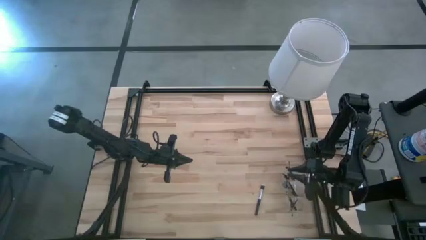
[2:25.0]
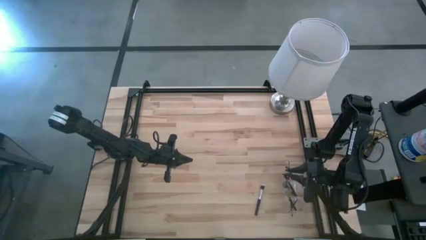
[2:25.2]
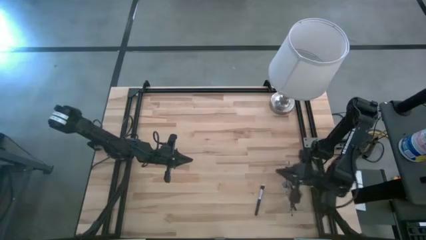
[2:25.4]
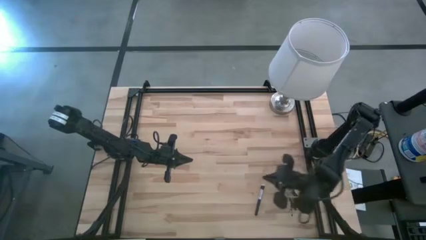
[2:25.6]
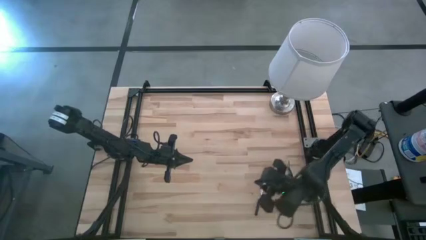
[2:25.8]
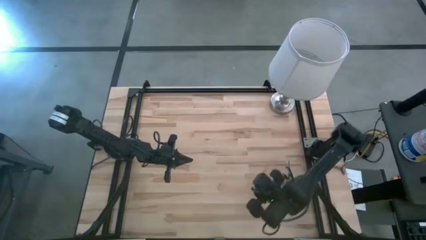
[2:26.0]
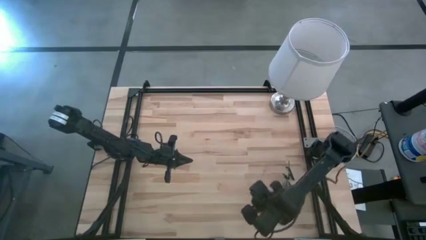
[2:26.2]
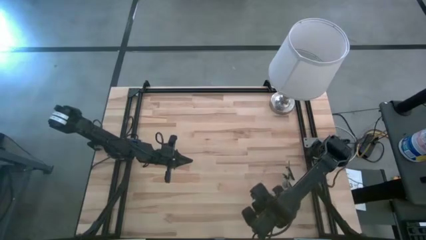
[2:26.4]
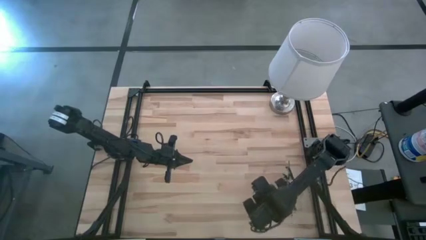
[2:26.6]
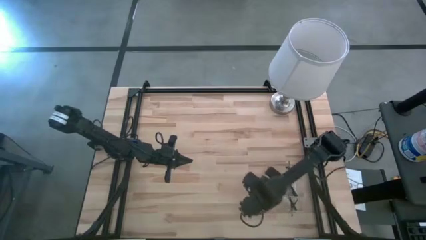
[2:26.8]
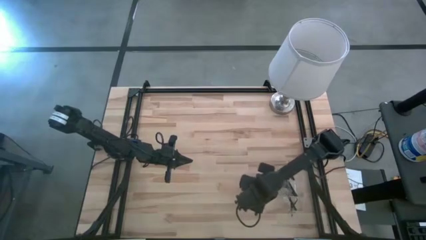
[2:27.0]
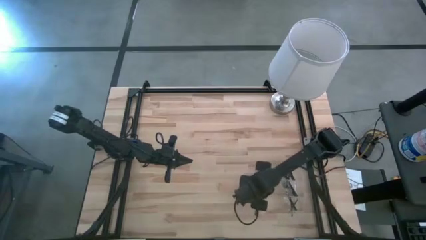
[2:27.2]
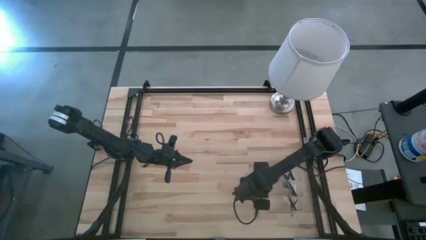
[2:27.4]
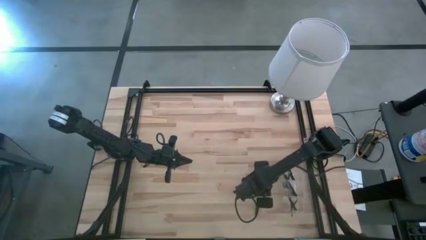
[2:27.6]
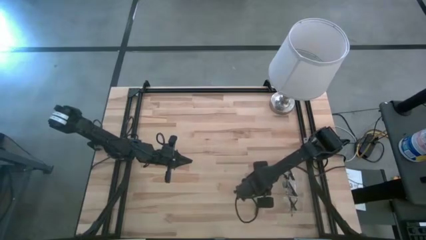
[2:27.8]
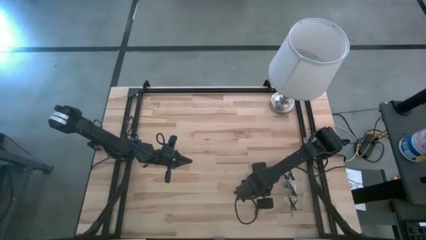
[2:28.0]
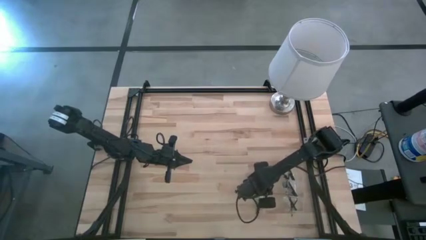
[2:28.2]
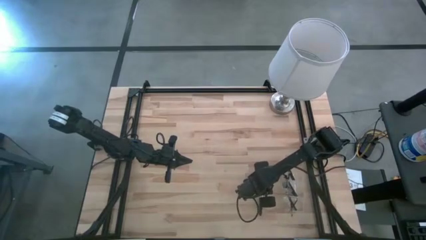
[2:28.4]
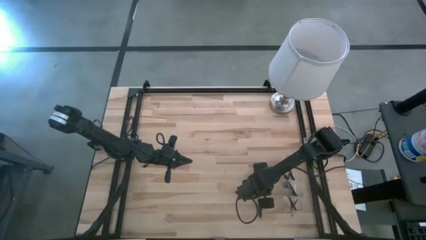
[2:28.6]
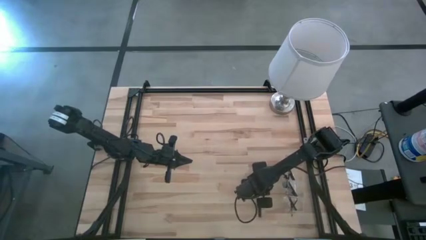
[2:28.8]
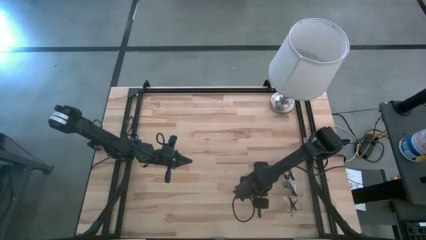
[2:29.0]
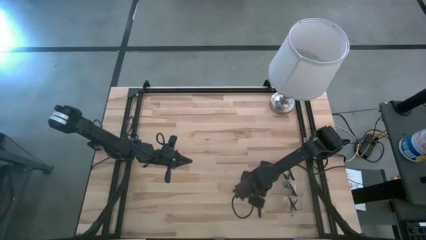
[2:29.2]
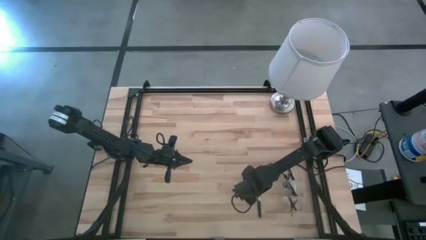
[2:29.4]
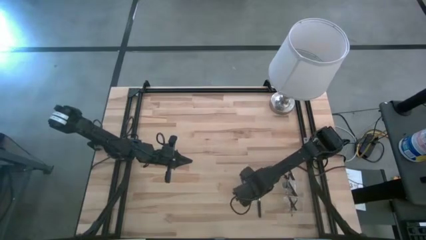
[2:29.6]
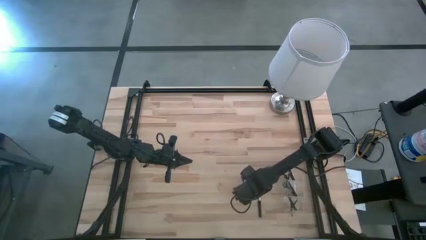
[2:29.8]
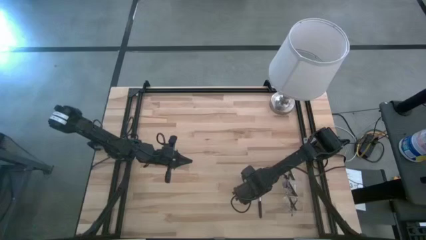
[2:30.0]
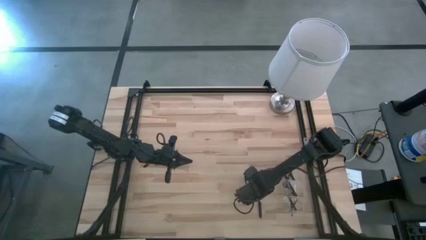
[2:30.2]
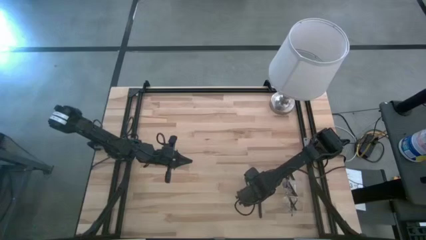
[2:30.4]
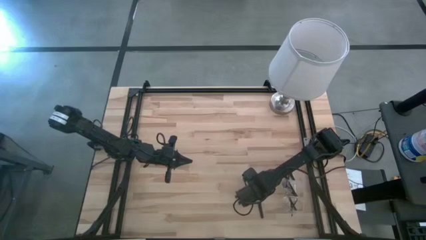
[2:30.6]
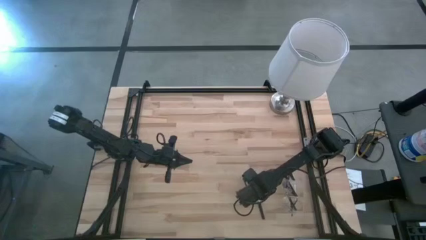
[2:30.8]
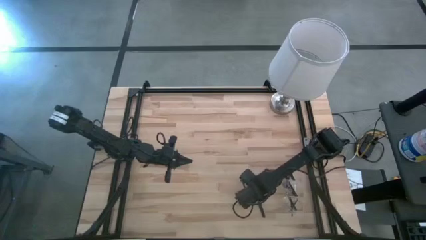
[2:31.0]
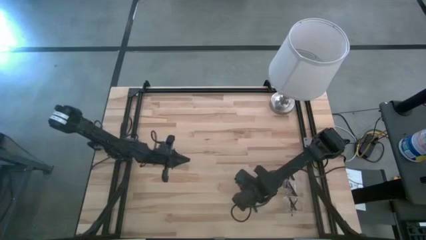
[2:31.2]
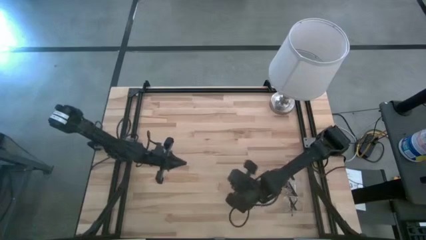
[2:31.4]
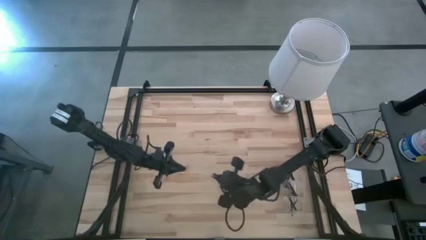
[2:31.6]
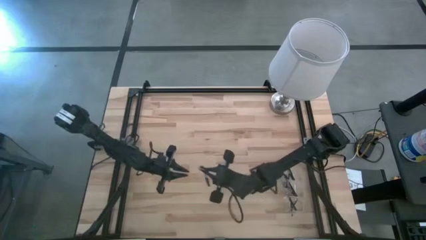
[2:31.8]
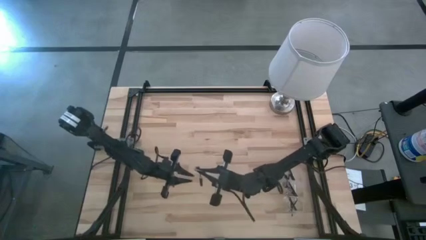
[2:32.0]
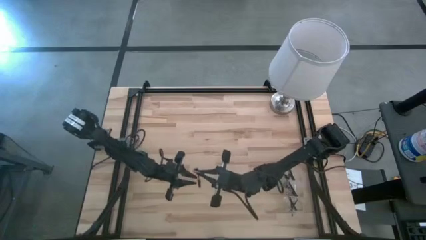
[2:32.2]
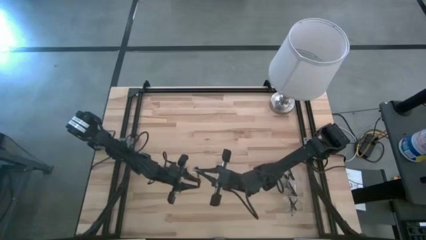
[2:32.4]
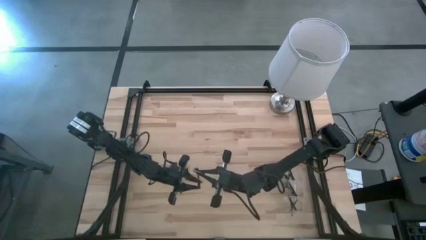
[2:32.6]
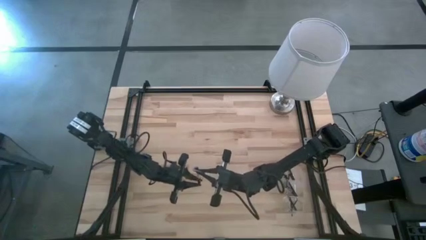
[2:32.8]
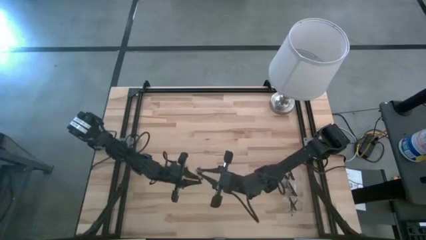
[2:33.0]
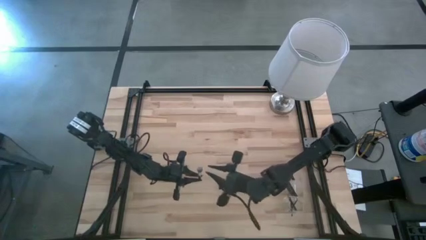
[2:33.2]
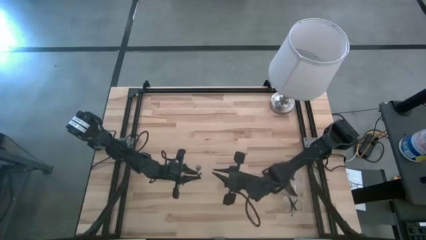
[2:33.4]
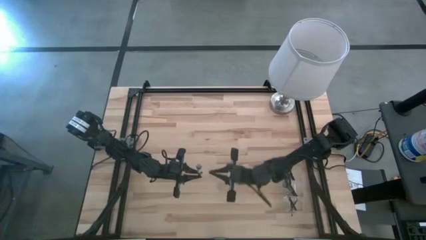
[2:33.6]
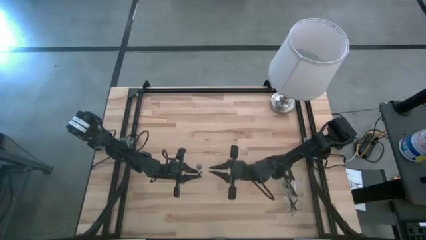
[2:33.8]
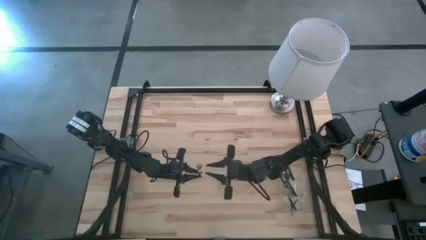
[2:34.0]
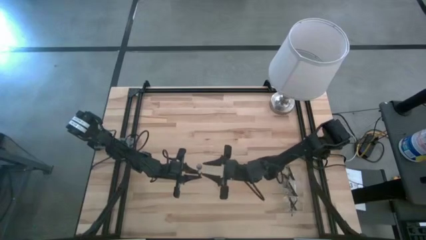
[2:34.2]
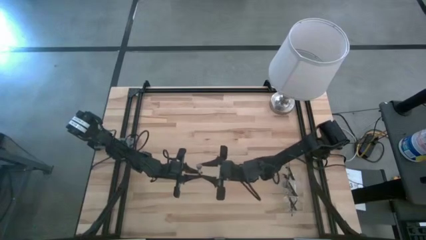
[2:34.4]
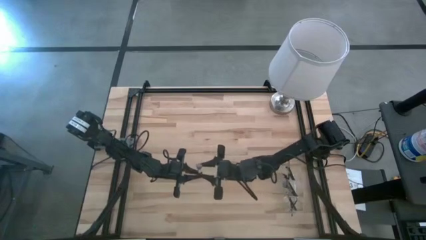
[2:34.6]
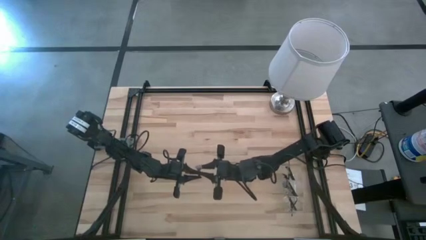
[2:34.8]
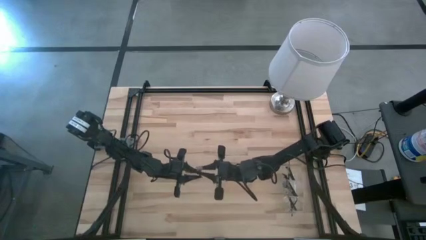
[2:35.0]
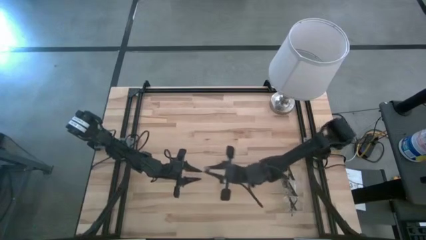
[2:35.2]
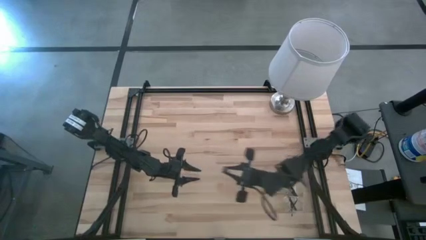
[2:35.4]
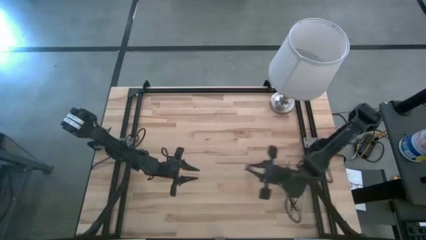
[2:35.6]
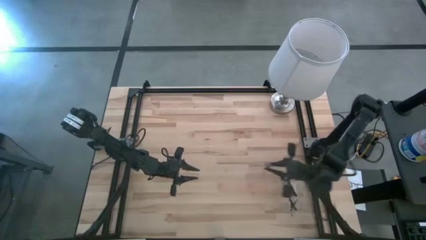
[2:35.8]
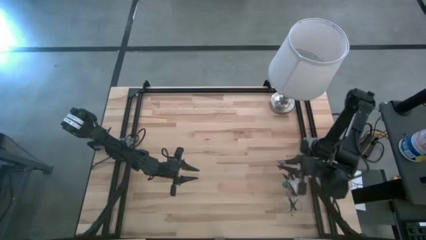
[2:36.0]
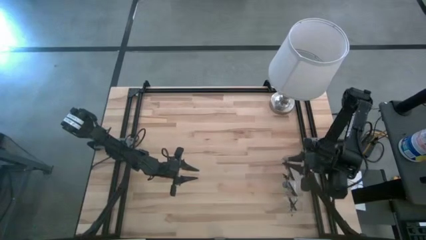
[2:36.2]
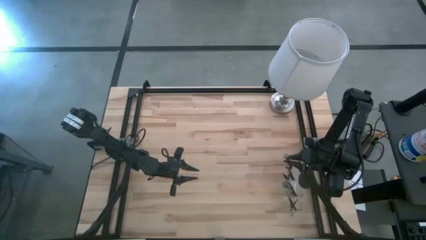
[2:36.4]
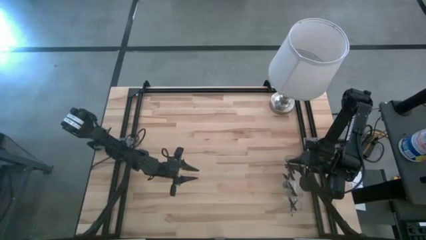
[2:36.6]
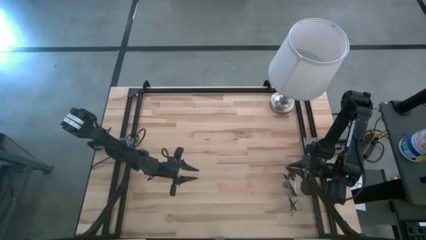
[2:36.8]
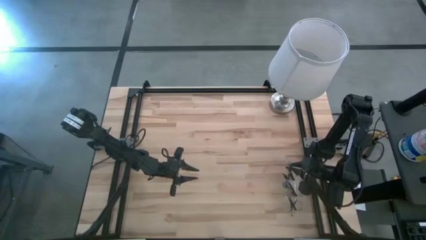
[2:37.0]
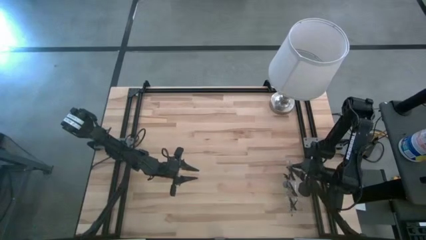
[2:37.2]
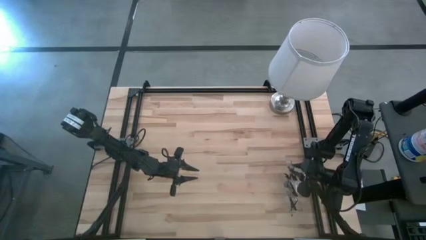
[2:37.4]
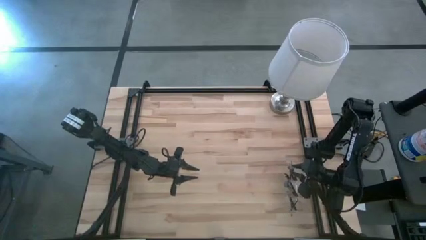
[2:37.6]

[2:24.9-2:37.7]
Task: Put items in baskets/containers
Put the powder brush into the transparent organizer
